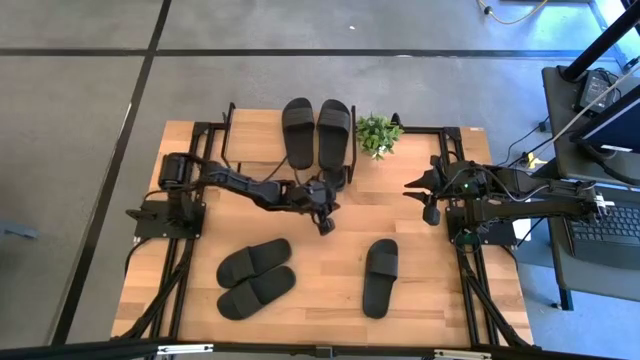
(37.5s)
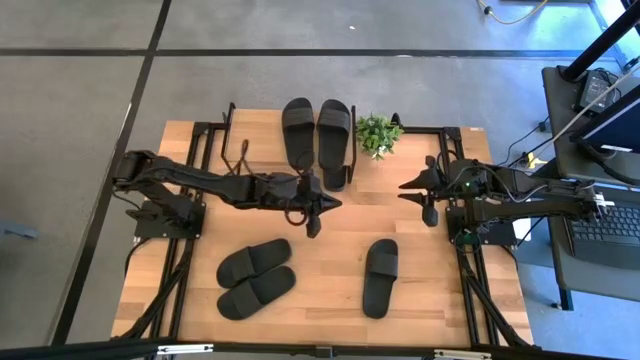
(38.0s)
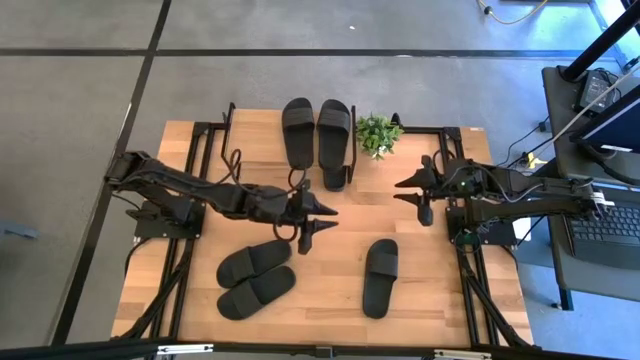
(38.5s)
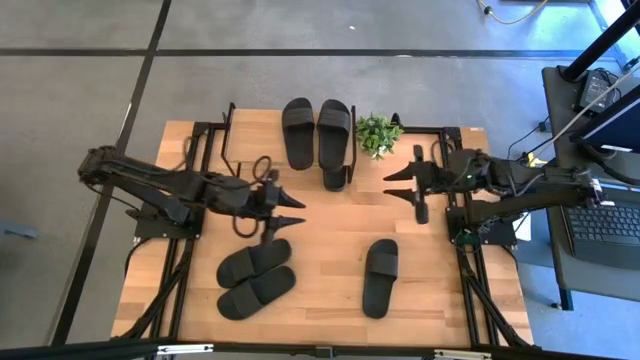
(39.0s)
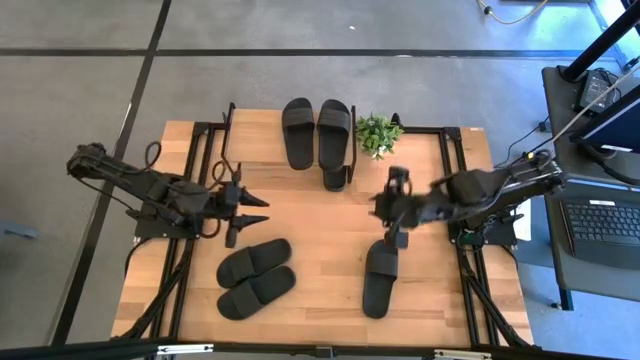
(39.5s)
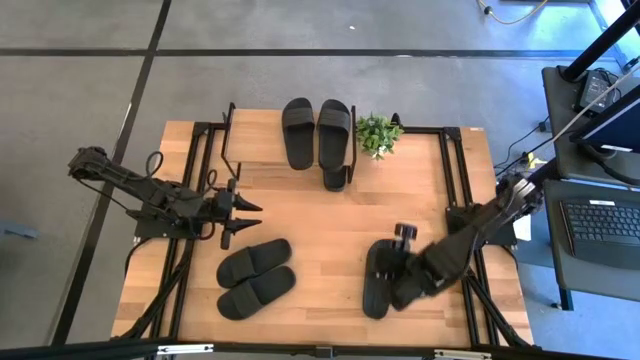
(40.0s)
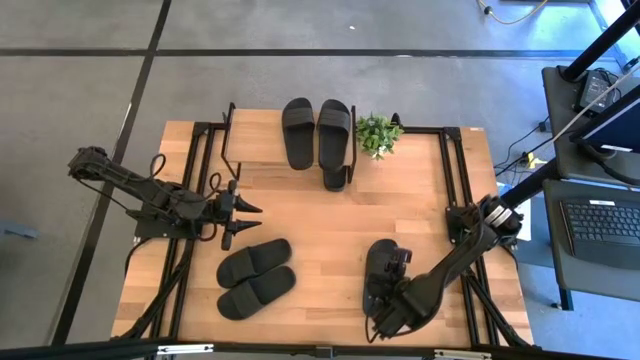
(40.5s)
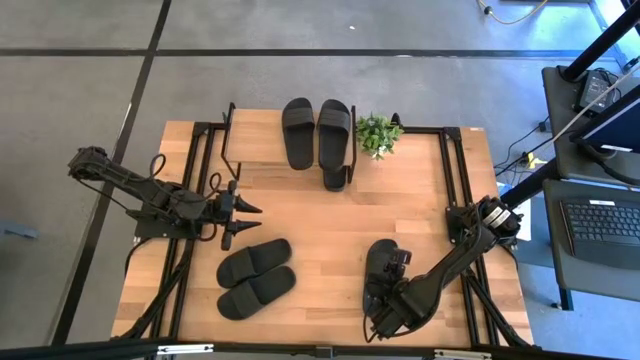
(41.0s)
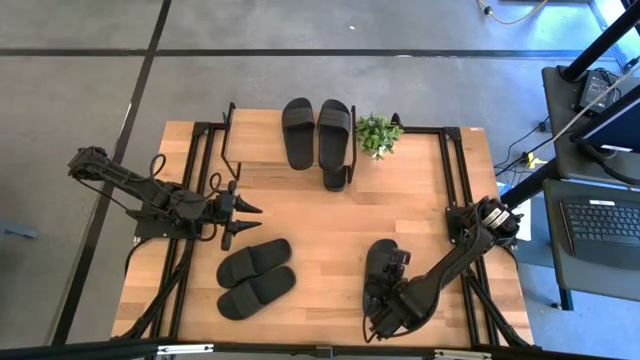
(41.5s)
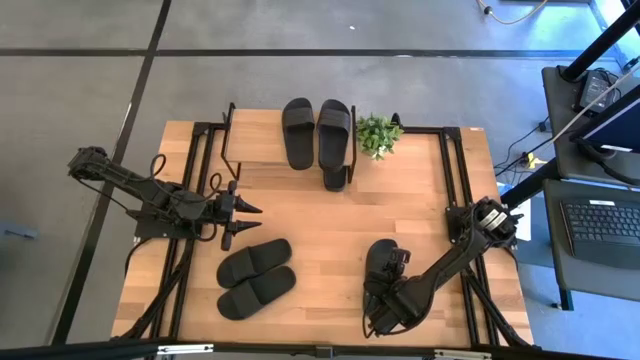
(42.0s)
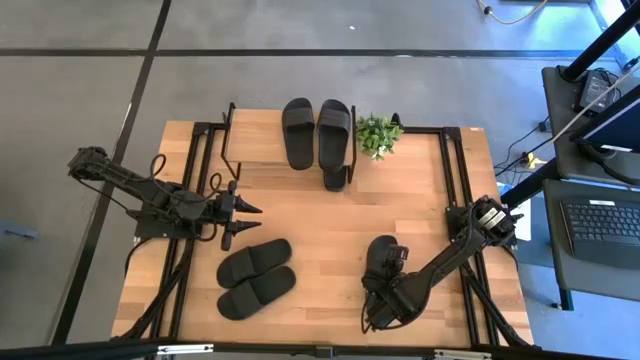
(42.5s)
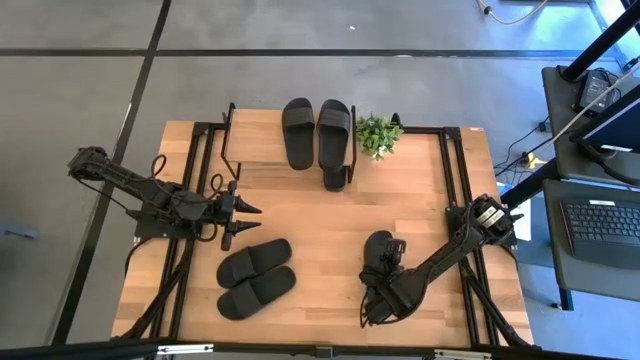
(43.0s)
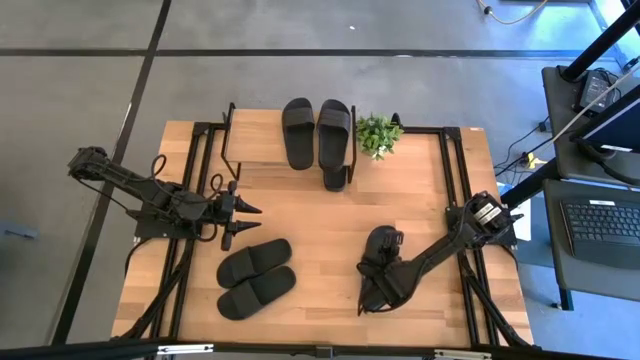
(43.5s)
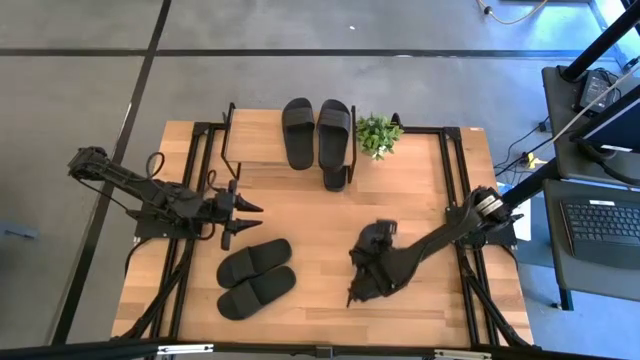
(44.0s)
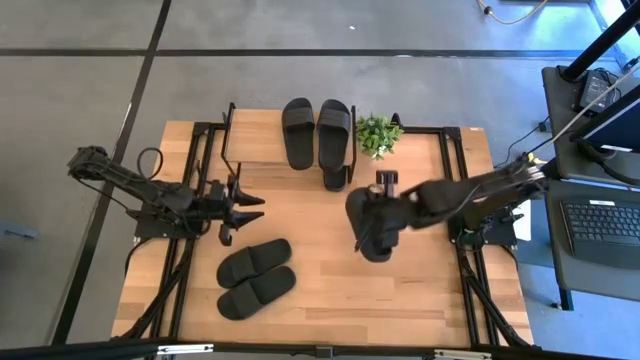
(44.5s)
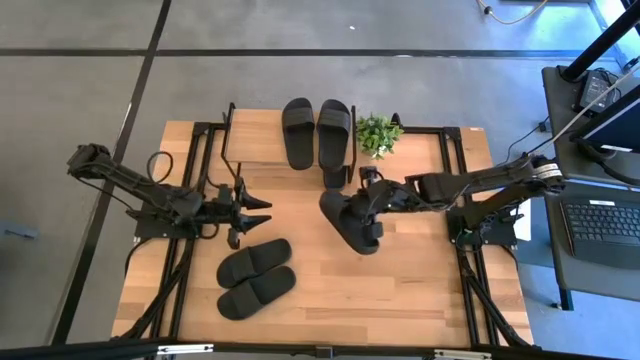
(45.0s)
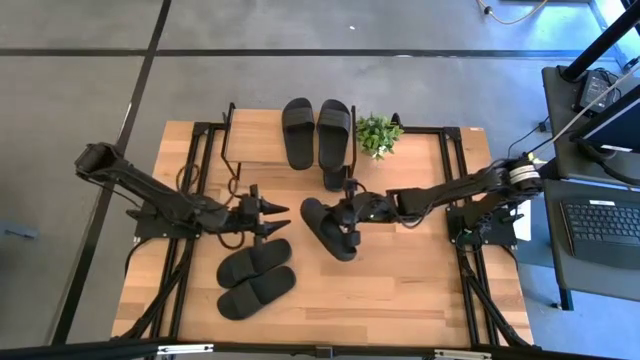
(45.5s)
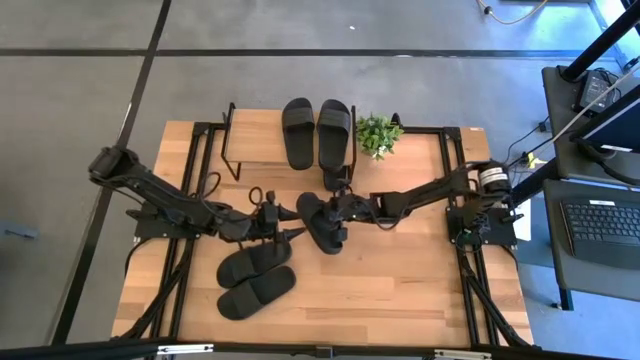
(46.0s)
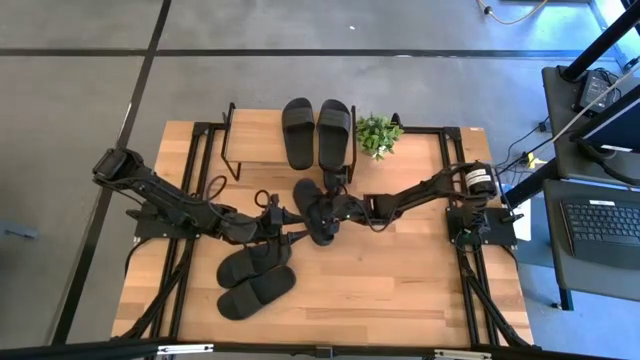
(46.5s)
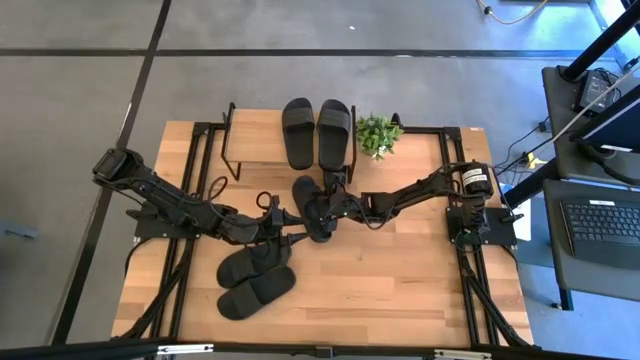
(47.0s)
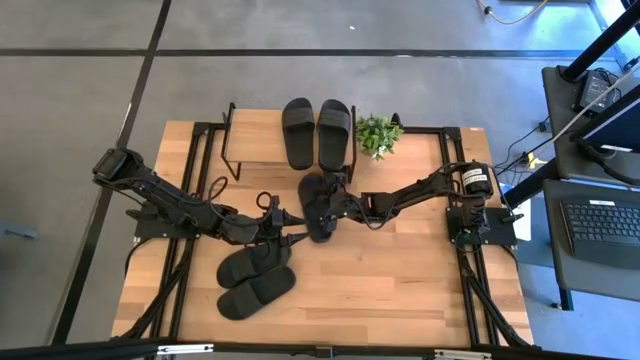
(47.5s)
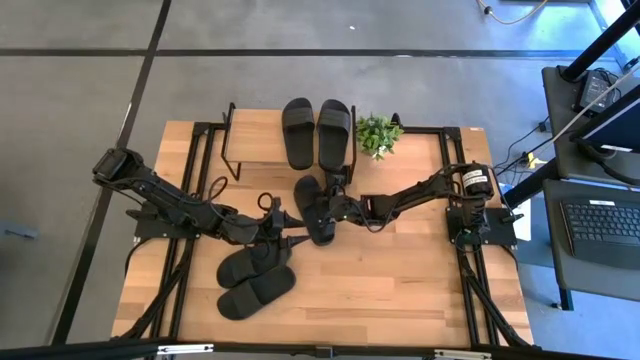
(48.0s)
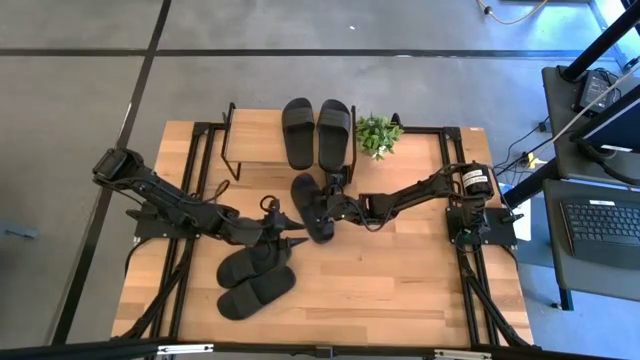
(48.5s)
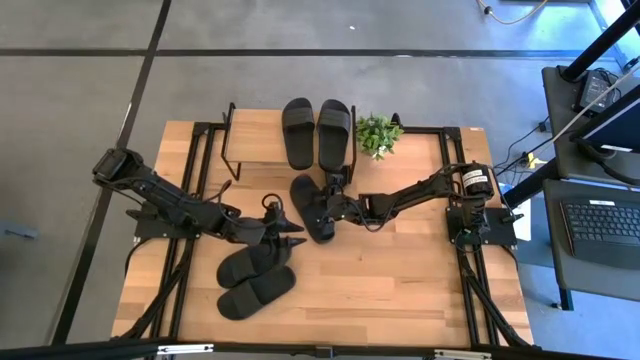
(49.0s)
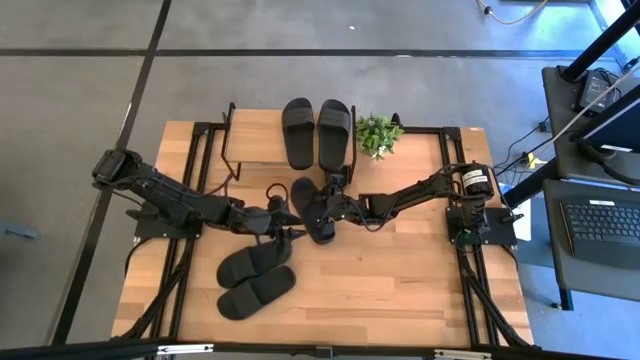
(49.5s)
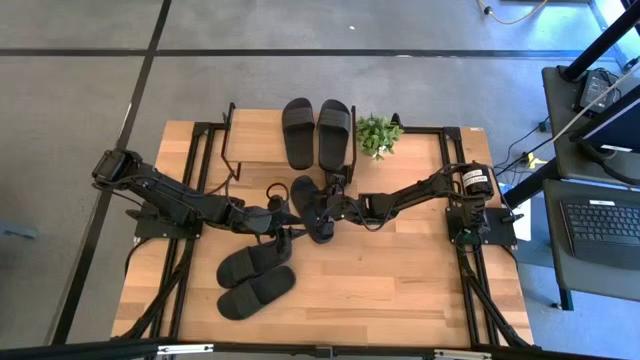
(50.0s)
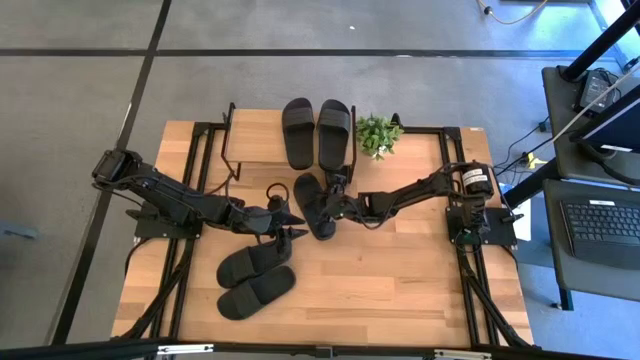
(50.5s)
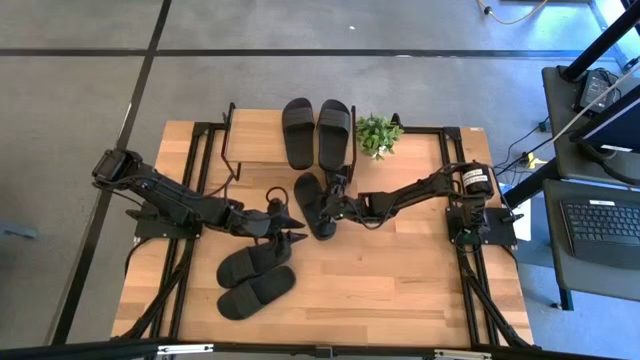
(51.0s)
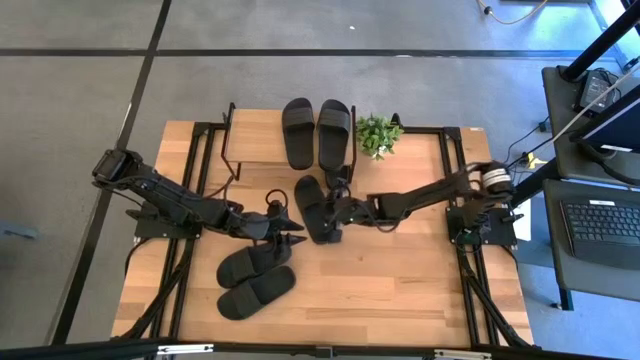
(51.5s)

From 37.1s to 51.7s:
Task: Pick and place slides into the shelf
Put the black slide under the shelf

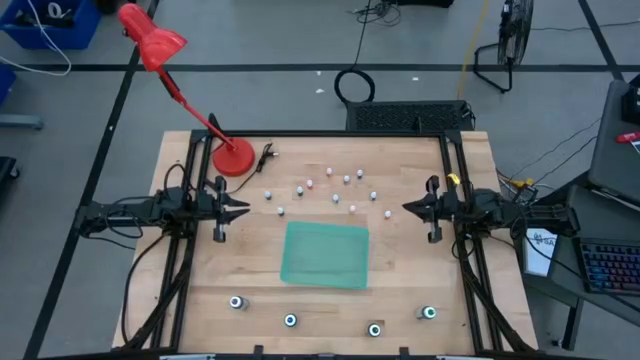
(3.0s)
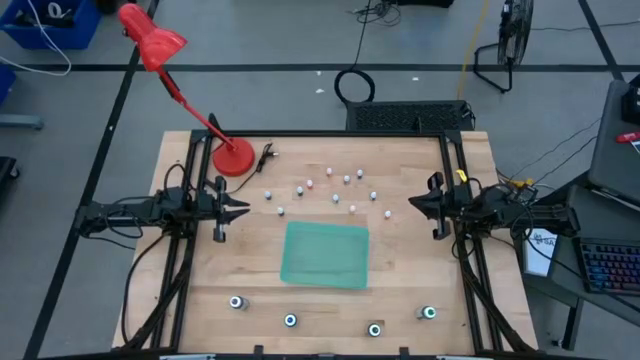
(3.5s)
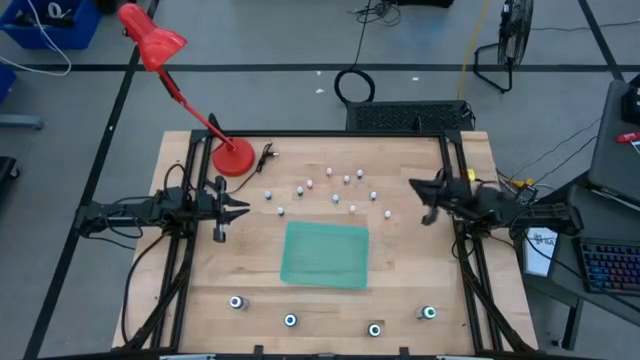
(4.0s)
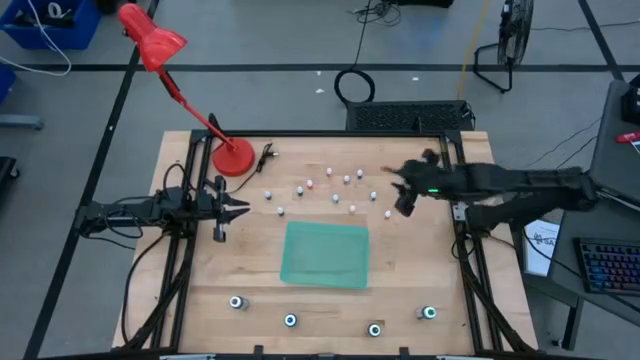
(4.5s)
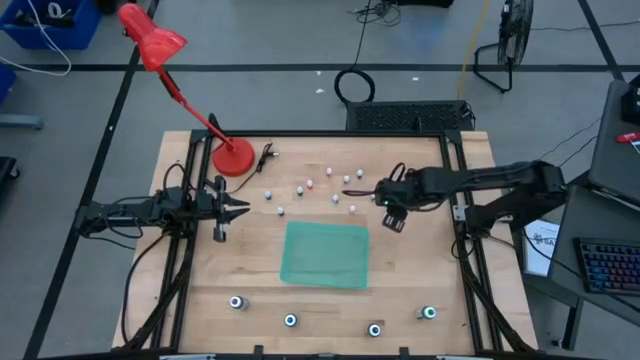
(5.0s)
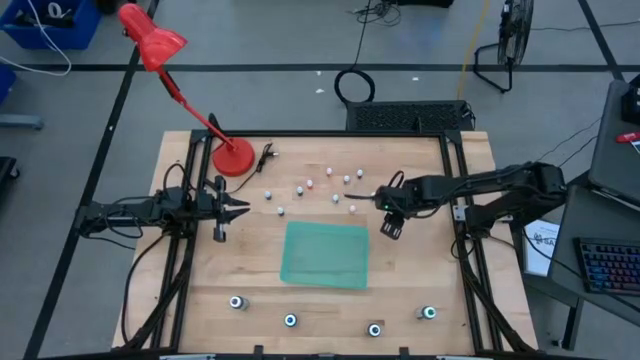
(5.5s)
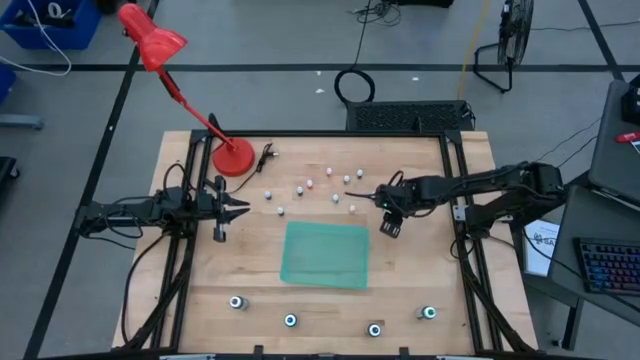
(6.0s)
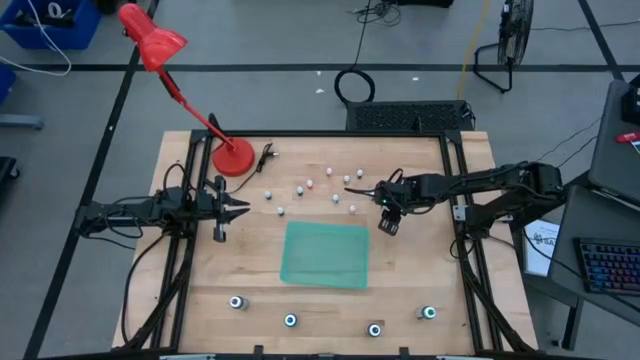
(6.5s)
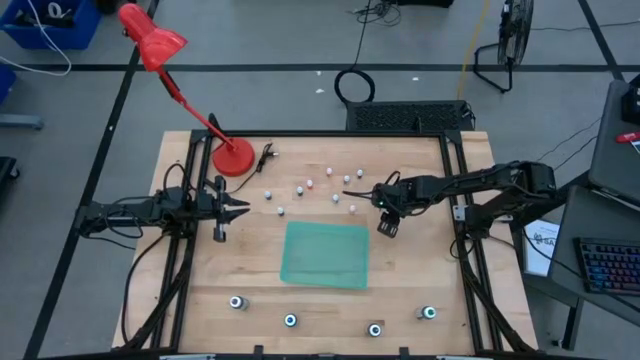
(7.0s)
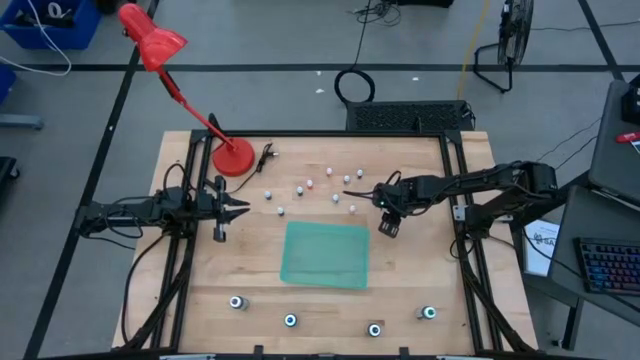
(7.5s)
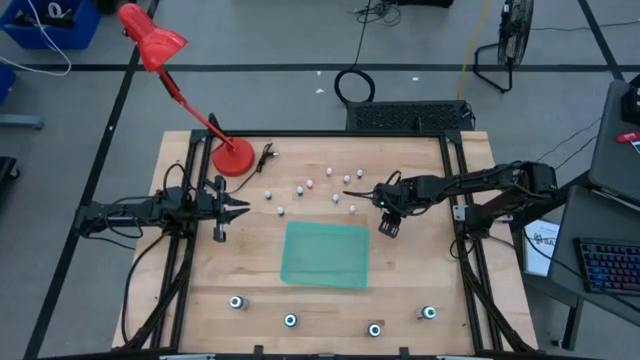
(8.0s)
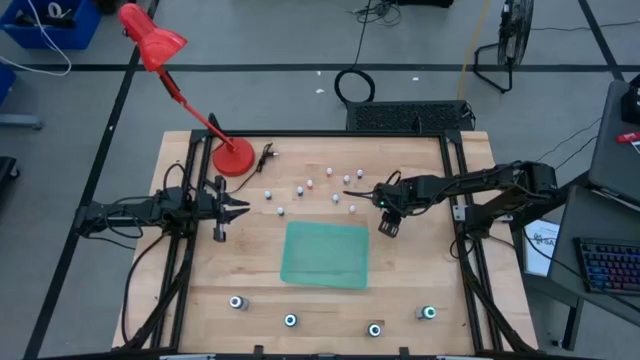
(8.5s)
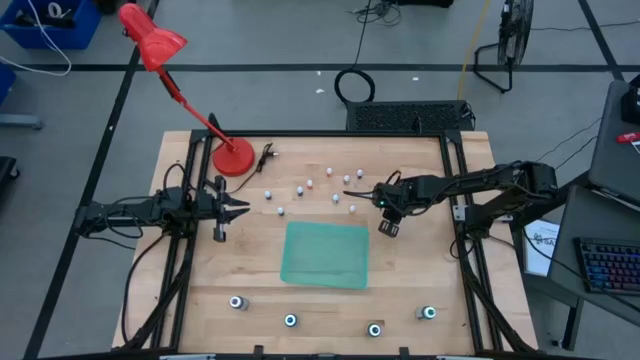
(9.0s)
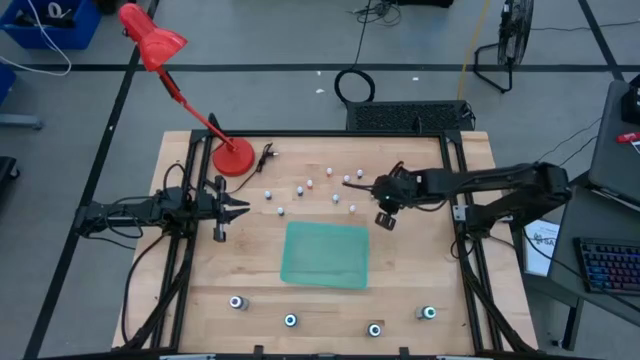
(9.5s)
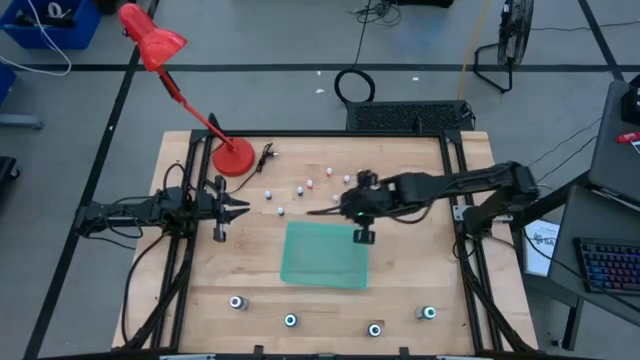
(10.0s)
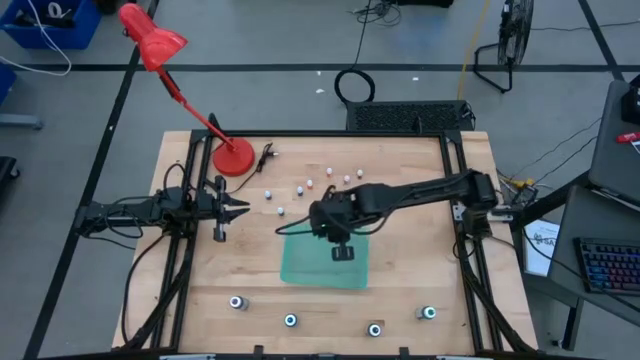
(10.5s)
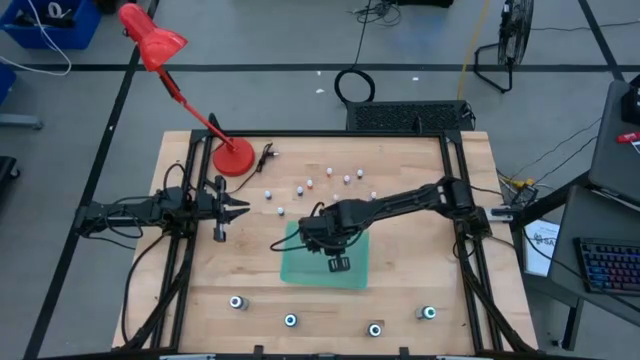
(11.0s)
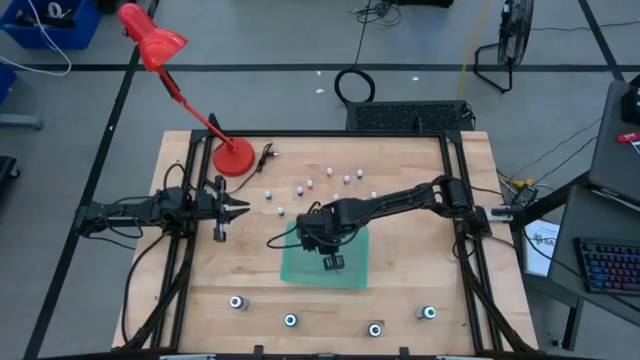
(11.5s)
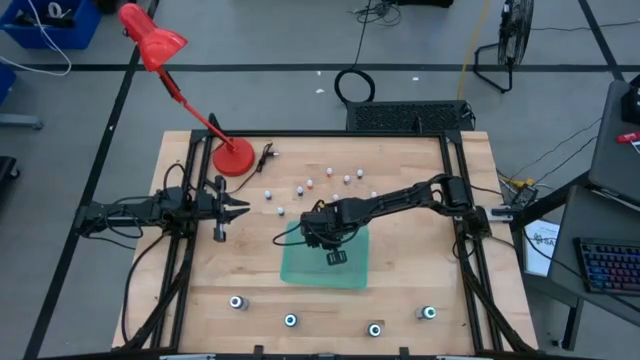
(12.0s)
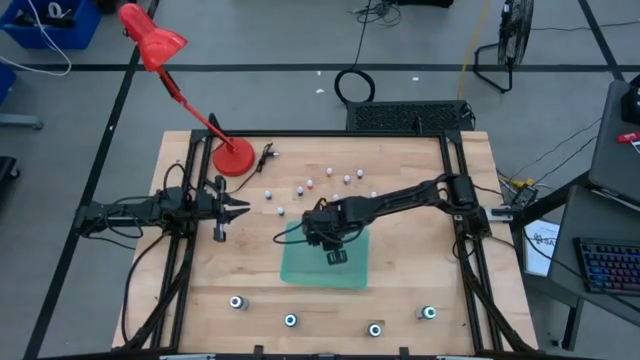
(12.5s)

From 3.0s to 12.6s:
Task: Pick & Place food coloring
Put the small orange food coloring bottle into the green bin
